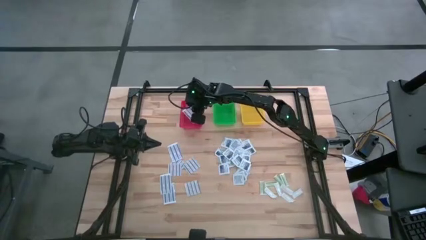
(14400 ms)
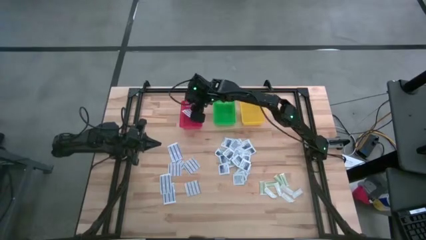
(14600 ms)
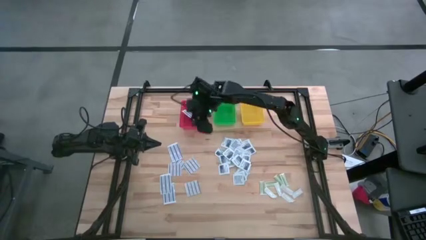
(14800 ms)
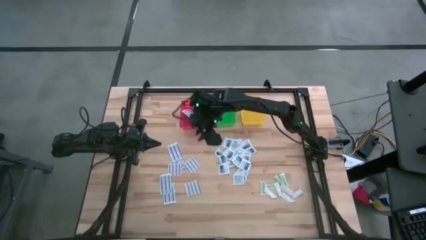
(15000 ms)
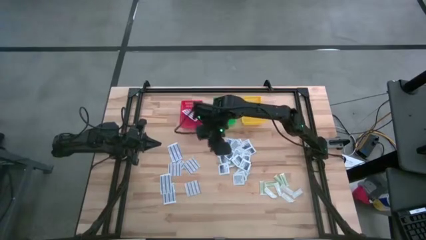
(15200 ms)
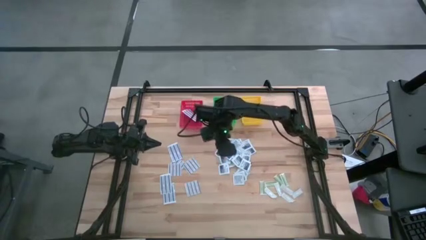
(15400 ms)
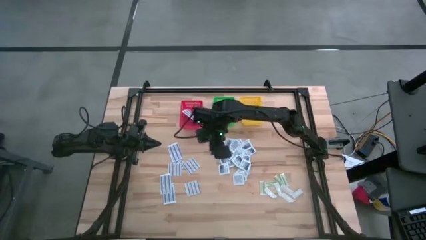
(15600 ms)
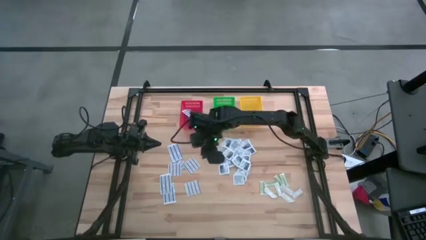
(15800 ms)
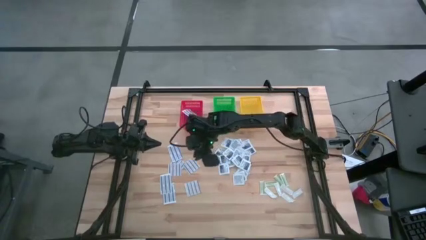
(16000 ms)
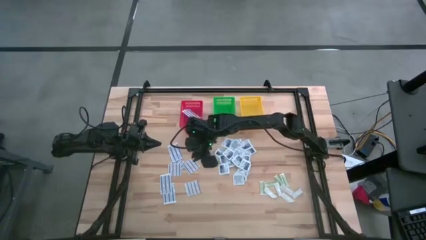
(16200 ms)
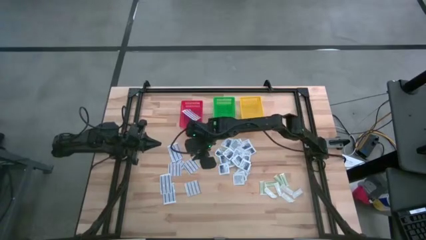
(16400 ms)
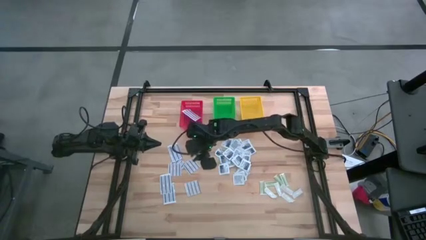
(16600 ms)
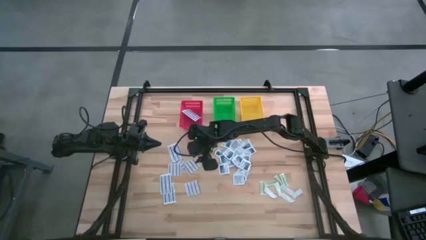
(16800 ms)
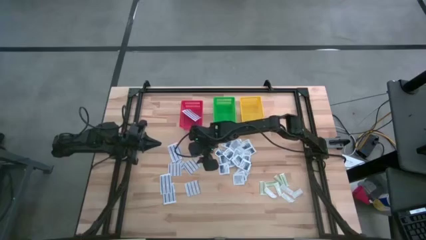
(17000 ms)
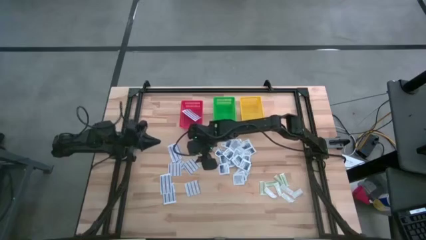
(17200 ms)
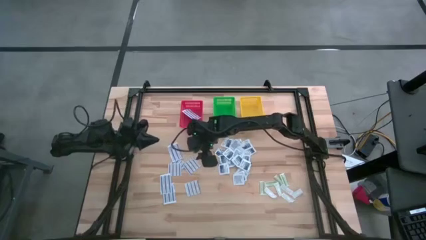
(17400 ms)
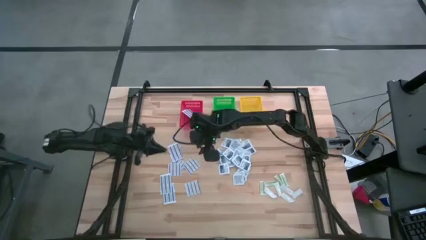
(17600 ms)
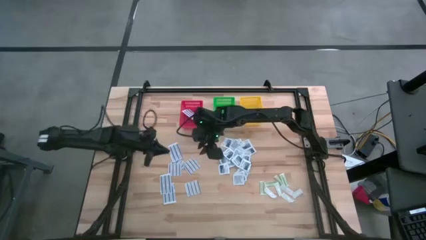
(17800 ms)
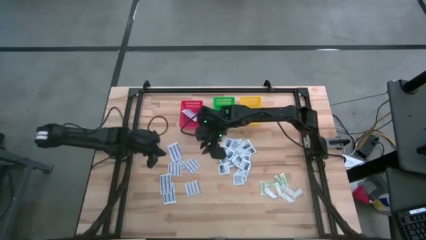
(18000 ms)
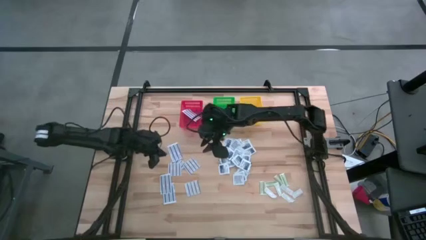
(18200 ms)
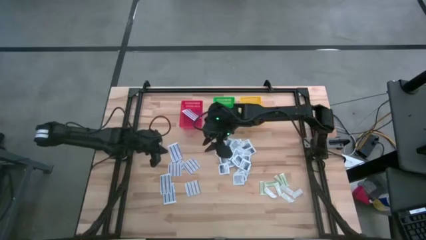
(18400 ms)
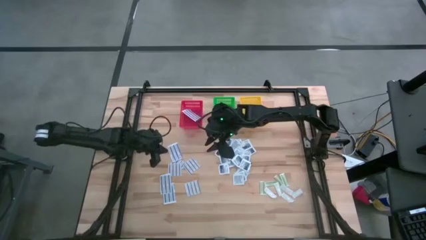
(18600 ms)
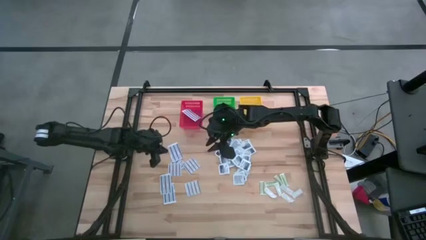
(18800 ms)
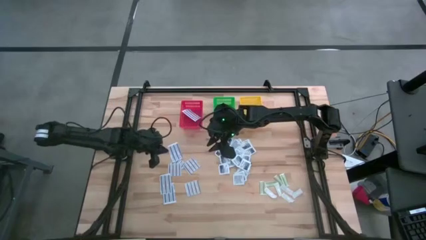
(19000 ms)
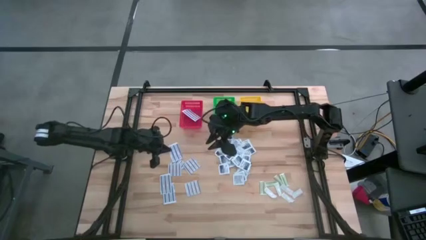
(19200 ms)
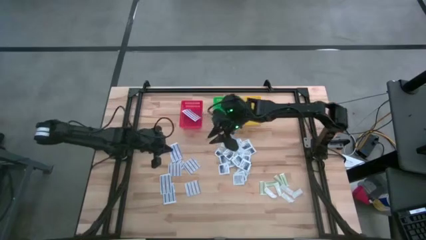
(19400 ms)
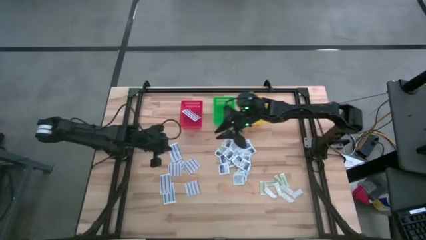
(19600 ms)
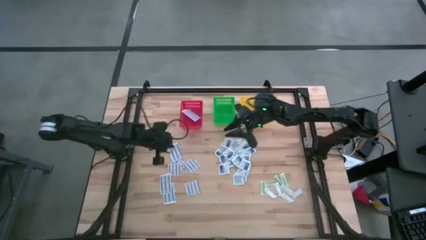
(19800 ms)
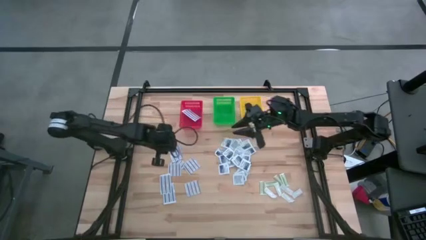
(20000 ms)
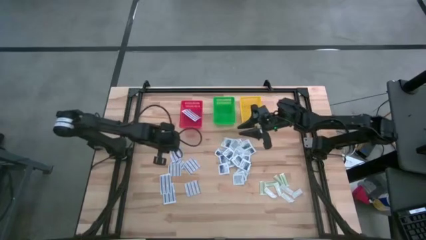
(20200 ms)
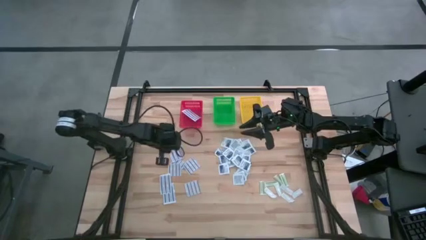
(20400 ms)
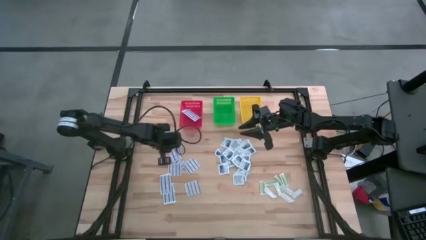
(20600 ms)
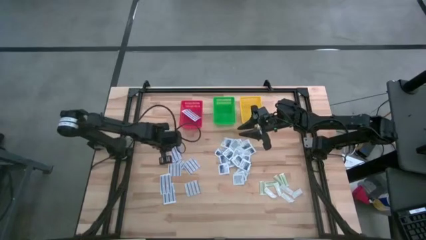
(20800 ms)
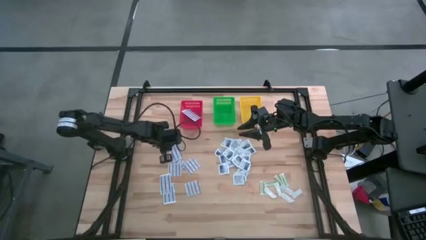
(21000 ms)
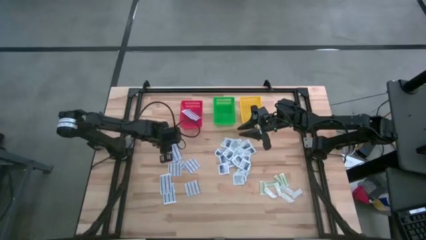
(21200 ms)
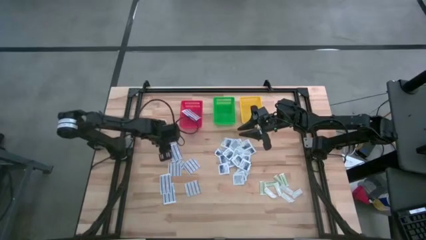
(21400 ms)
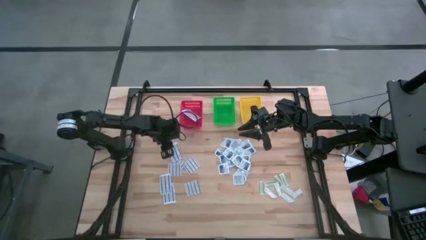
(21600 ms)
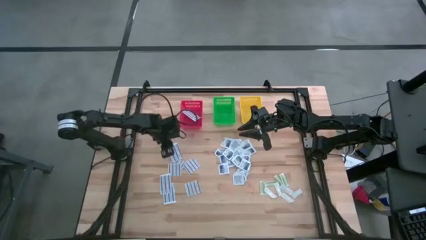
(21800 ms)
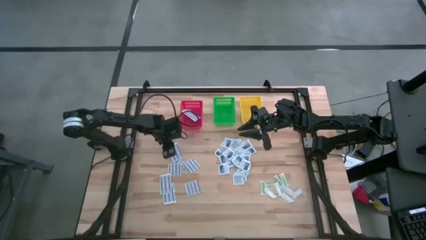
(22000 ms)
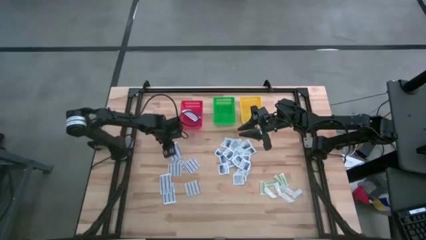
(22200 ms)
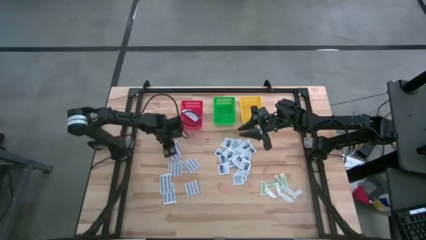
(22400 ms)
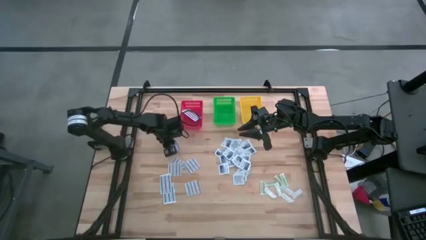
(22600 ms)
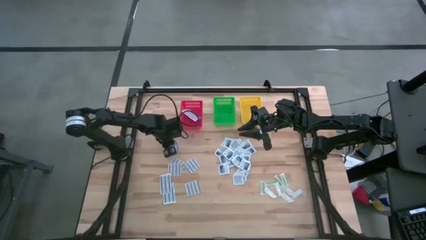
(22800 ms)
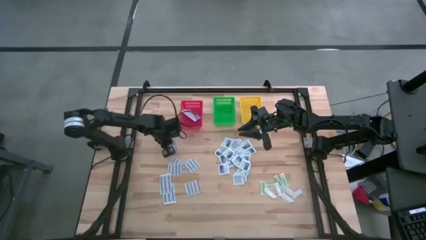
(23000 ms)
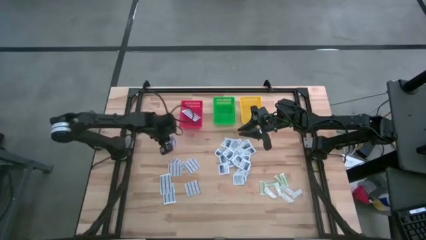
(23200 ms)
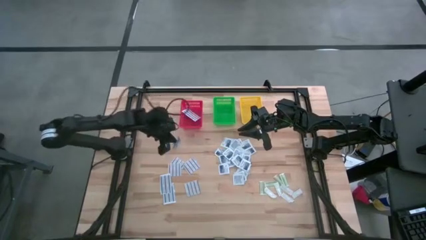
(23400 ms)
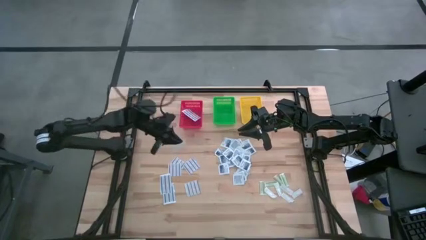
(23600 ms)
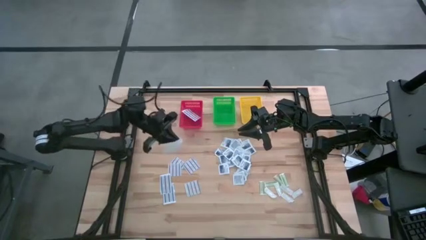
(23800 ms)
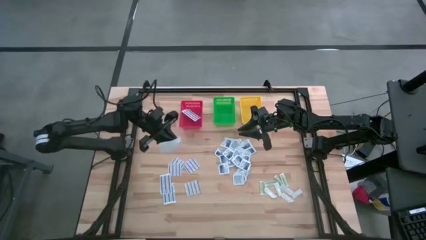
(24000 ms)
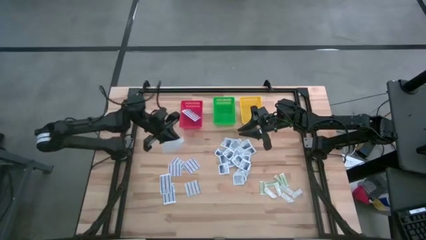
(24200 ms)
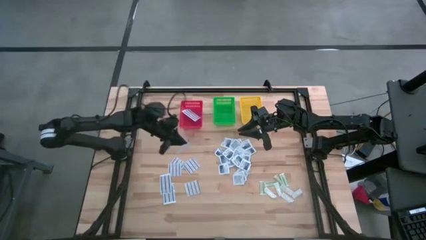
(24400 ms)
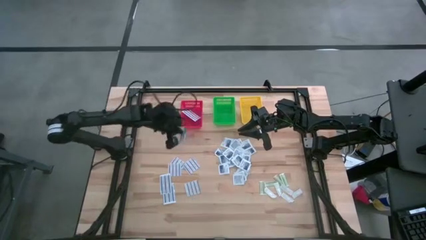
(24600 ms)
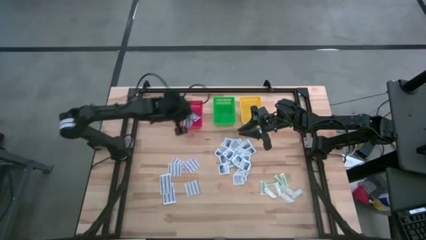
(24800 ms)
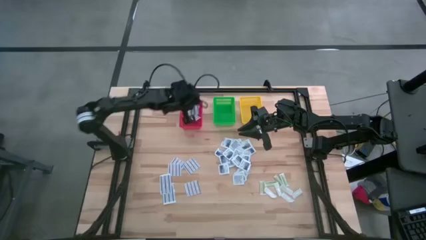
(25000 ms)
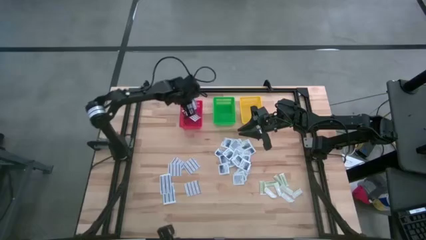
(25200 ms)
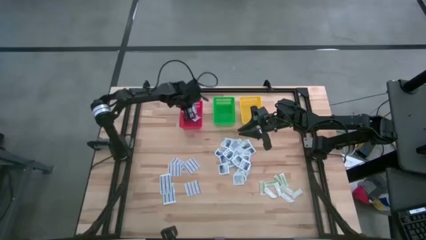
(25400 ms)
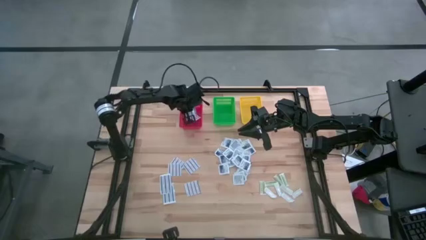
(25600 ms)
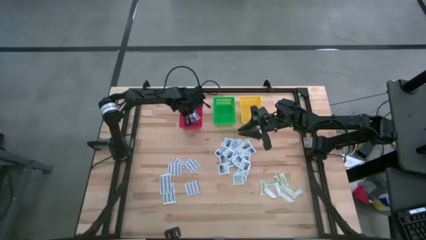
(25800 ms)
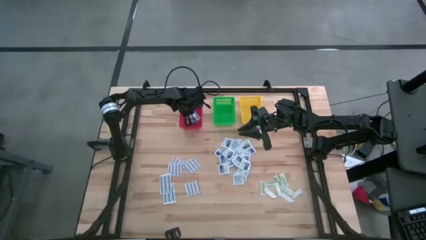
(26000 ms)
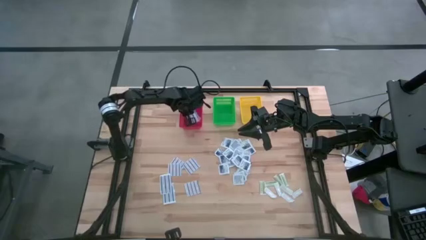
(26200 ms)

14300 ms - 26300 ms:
Task: Pick & Place First Aid Supplies
Put the blue bandage into the red basket
